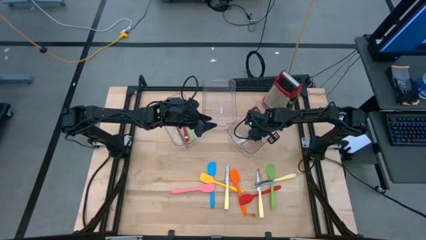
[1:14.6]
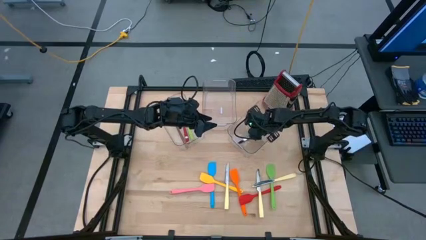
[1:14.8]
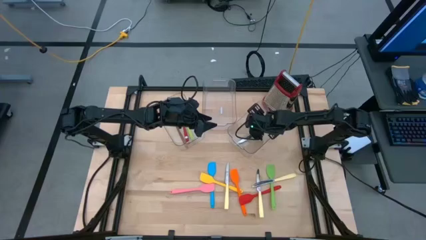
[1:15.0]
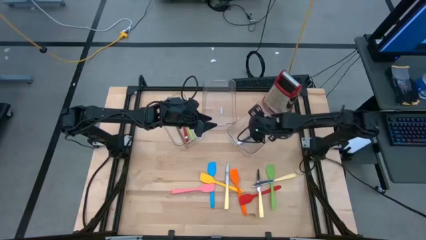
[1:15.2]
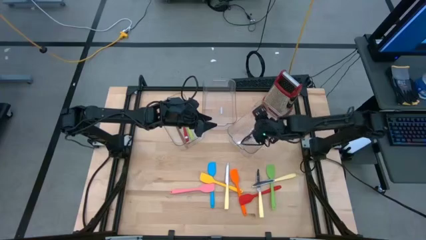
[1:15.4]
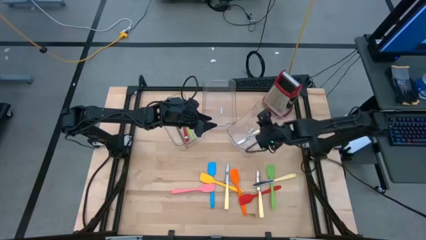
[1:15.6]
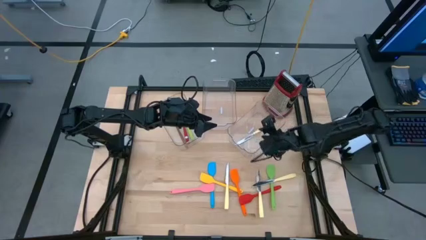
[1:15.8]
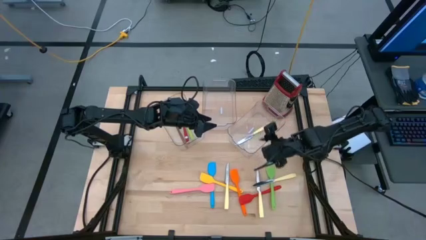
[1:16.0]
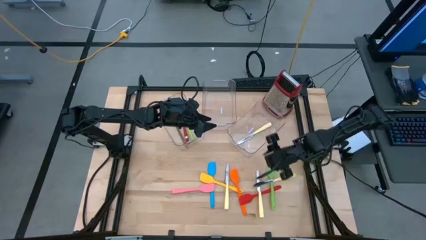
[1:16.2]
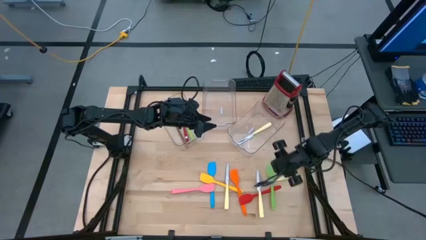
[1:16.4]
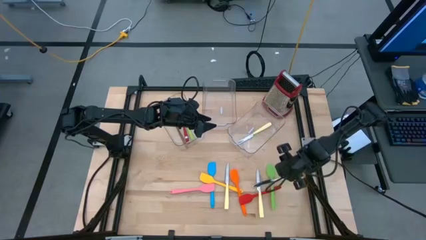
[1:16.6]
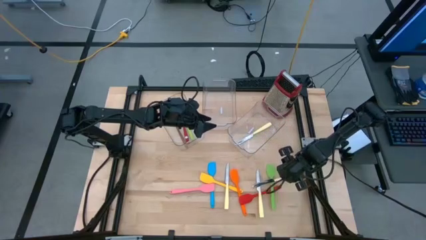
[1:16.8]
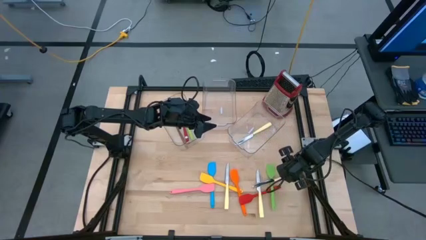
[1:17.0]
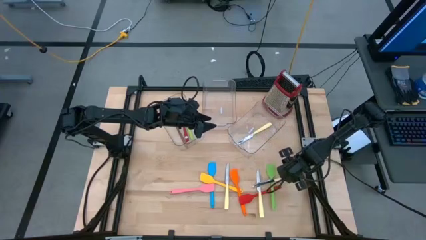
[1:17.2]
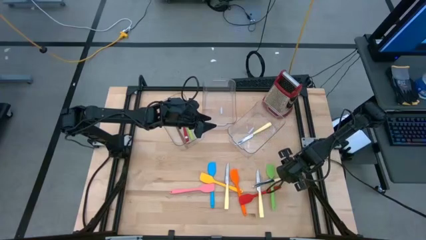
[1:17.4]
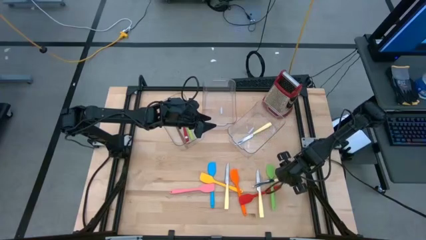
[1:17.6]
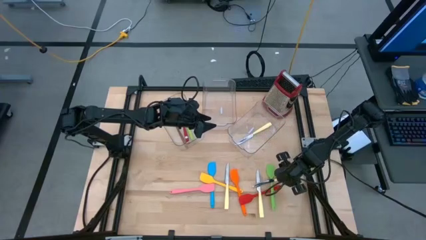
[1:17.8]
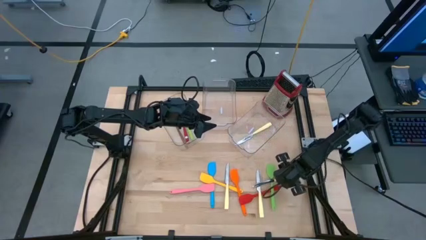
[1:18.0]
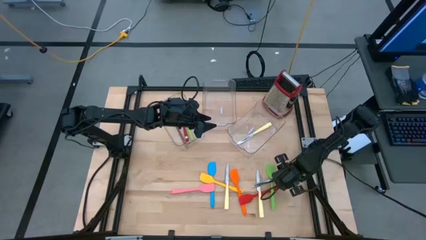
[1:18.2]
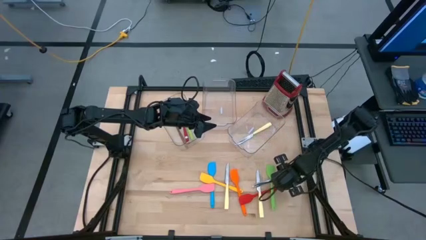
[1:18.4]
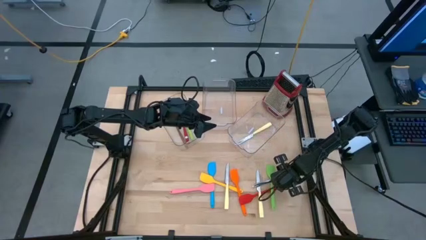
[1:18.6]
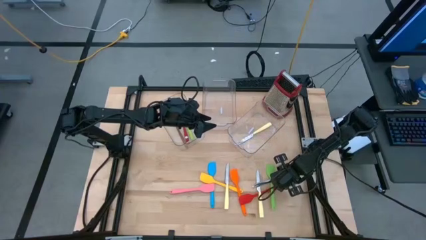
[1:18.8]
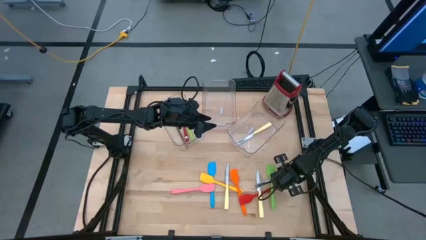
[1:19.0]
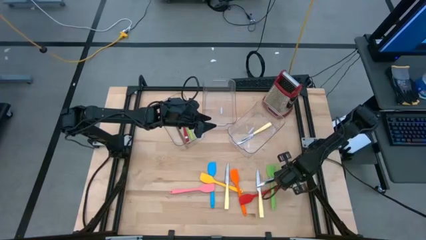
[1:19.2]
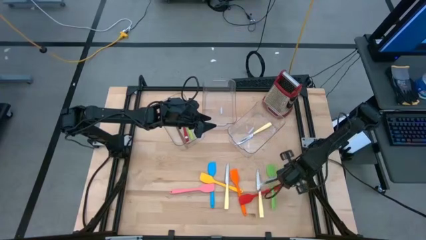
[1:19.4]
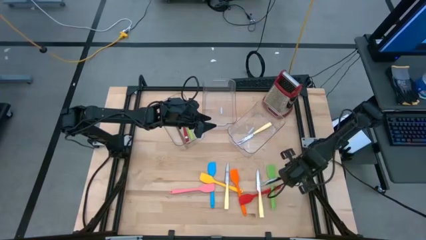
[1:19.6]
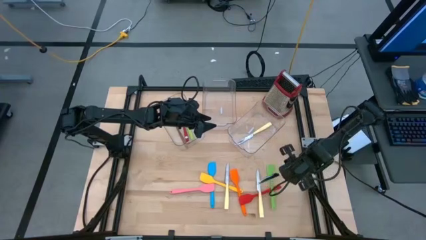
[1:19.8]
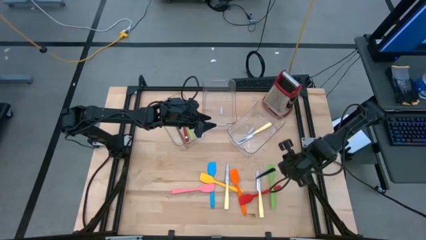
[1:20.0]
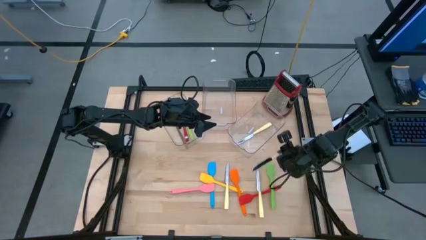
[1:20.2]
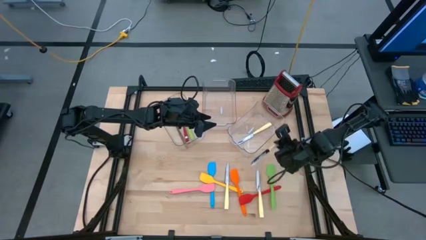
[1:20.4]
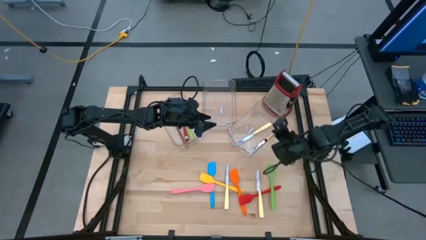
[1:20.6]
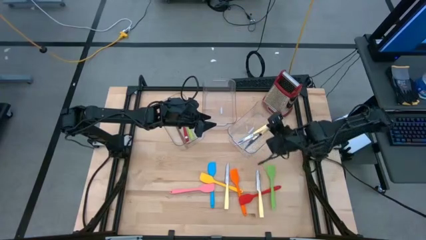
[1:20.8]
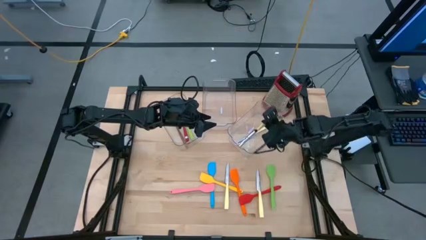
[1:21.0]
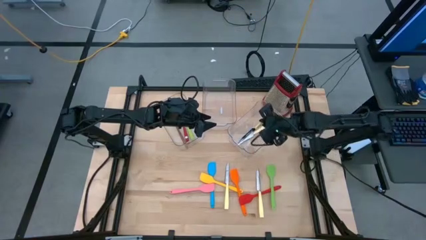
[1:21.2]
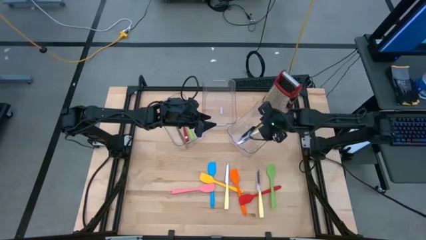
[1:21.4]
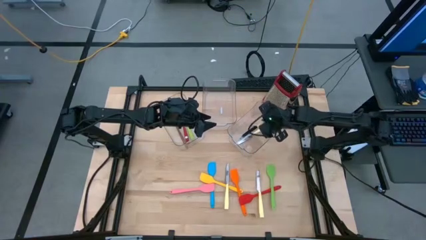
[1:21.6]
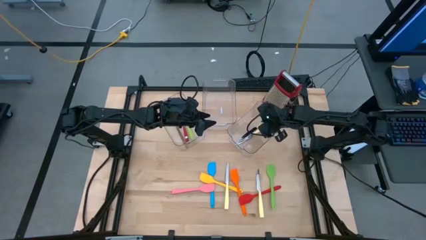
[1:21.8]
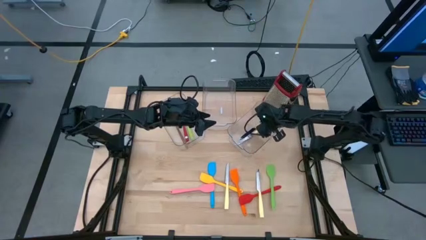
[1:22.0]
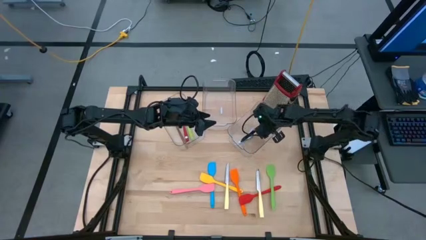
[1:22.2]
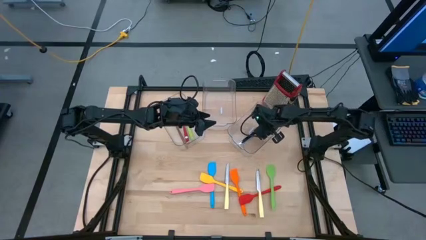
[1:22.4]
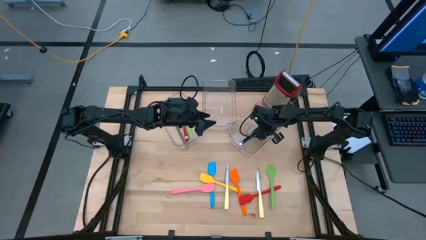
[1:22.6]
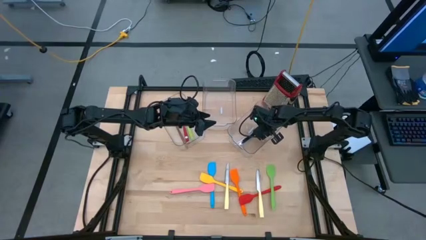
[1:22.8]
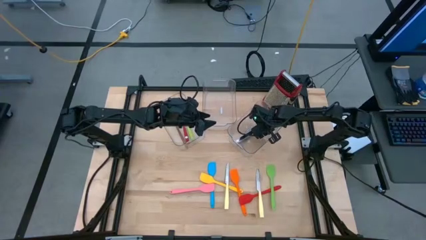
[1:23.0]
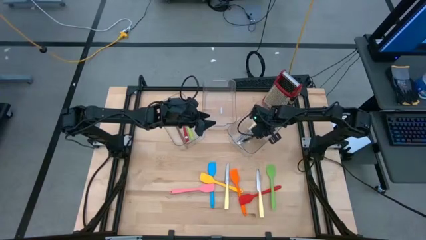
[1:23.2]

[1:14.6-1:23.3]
Task: Pick & Place Kitchen Items
Put the yellow table knife into the right transparent bin

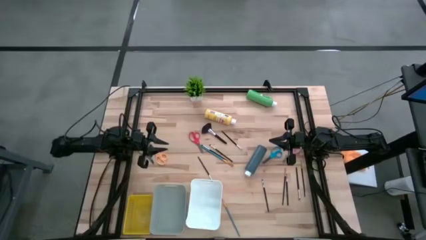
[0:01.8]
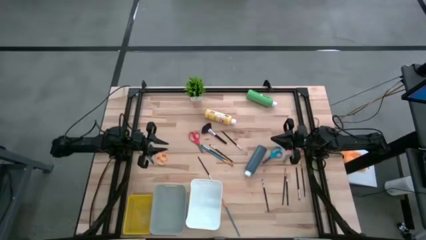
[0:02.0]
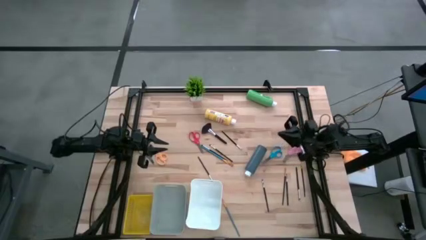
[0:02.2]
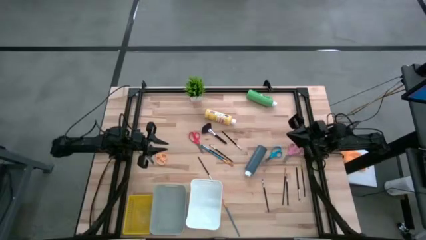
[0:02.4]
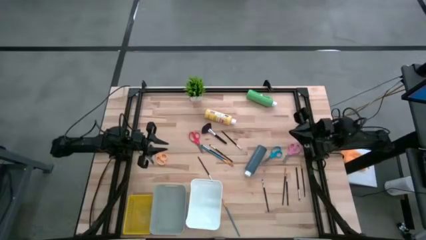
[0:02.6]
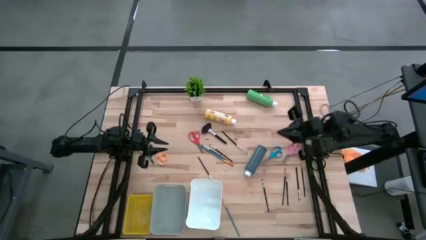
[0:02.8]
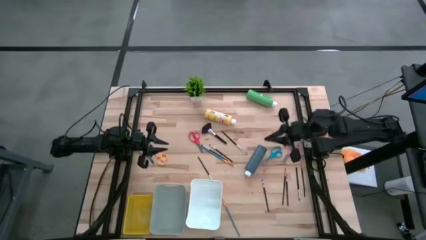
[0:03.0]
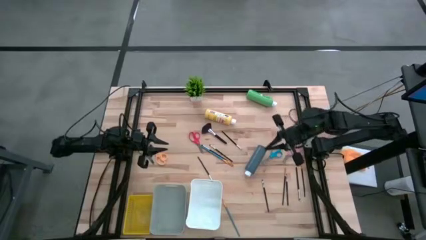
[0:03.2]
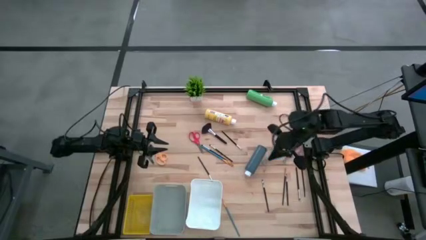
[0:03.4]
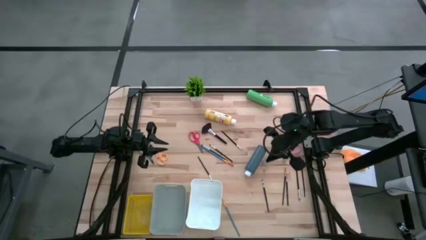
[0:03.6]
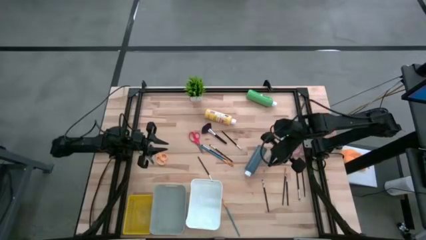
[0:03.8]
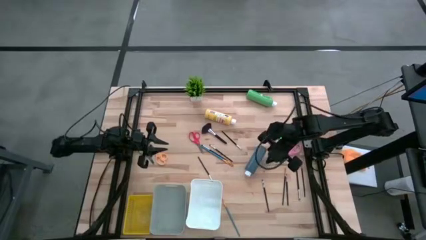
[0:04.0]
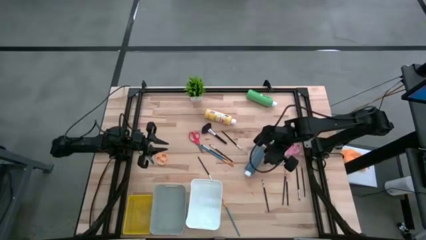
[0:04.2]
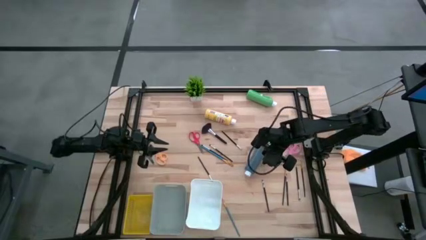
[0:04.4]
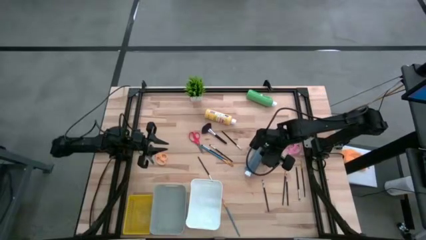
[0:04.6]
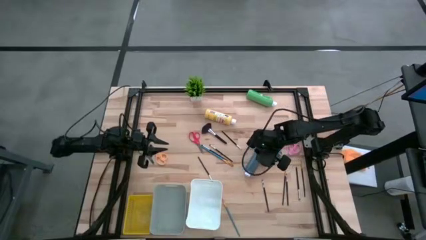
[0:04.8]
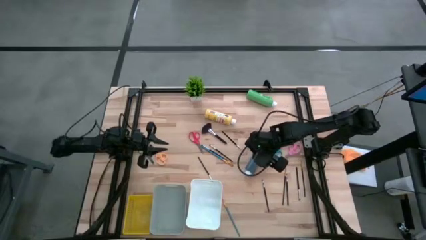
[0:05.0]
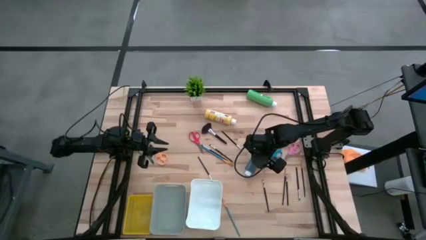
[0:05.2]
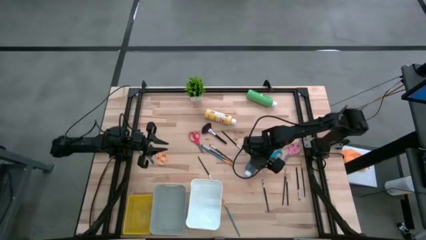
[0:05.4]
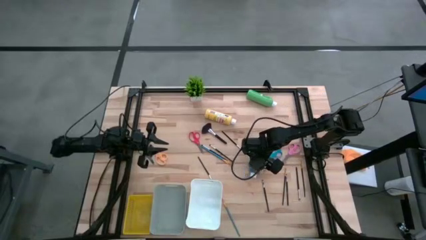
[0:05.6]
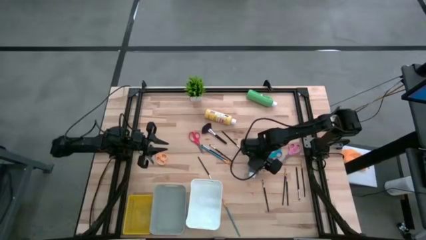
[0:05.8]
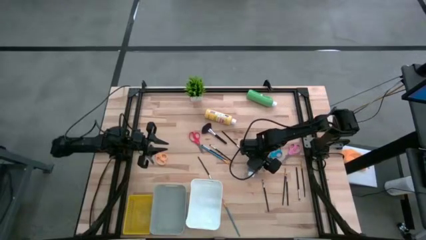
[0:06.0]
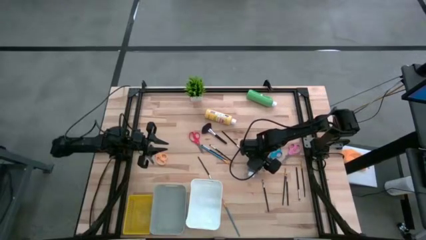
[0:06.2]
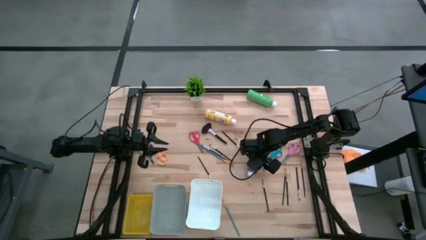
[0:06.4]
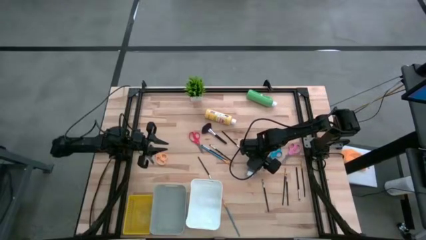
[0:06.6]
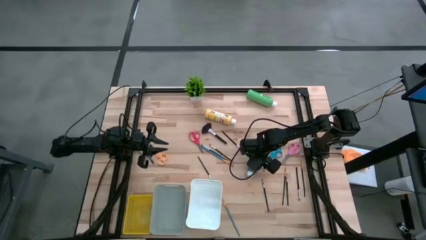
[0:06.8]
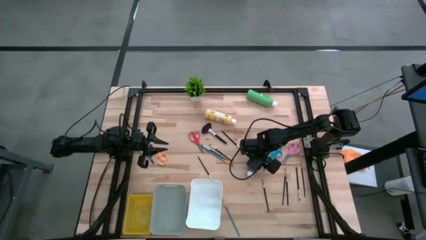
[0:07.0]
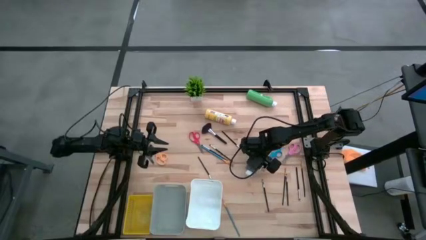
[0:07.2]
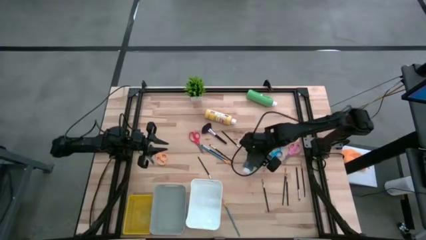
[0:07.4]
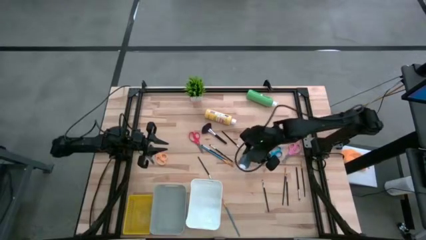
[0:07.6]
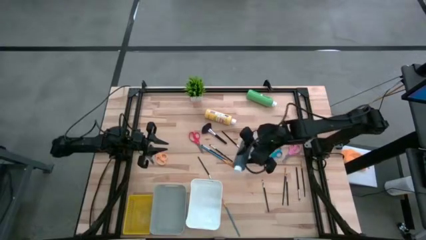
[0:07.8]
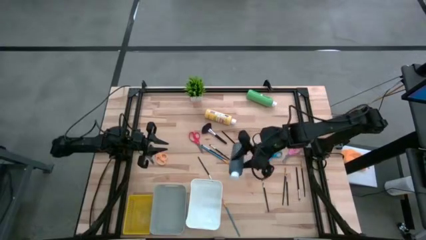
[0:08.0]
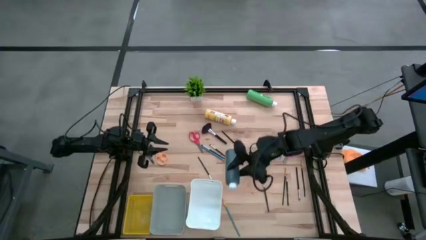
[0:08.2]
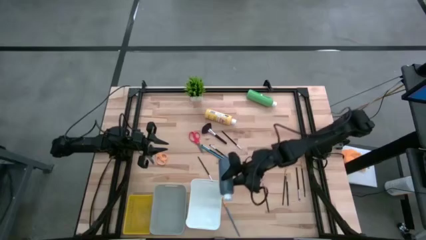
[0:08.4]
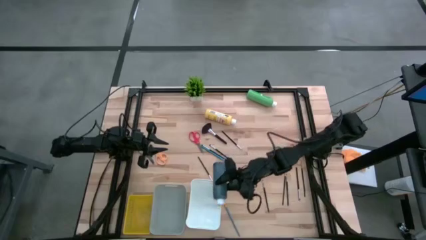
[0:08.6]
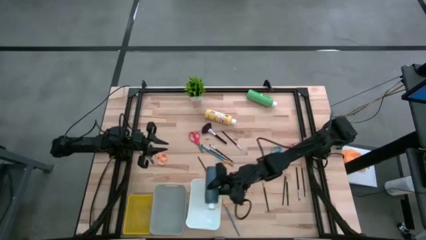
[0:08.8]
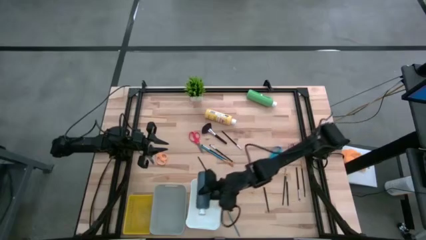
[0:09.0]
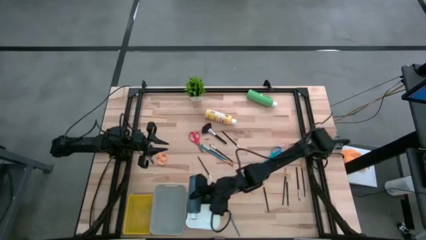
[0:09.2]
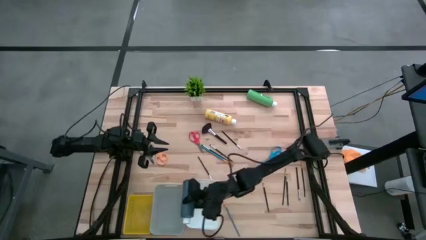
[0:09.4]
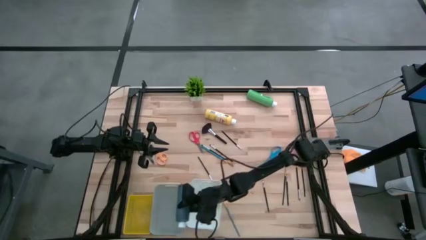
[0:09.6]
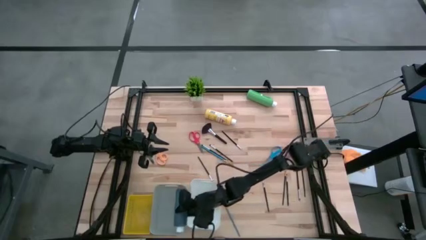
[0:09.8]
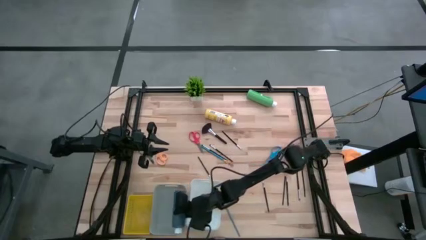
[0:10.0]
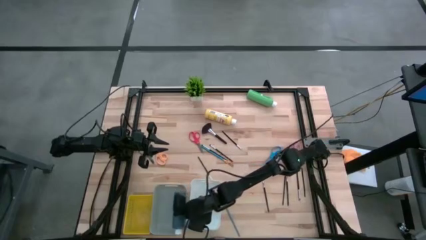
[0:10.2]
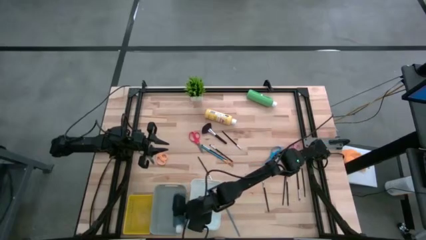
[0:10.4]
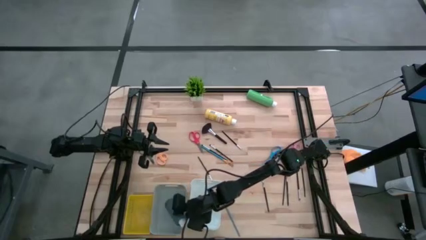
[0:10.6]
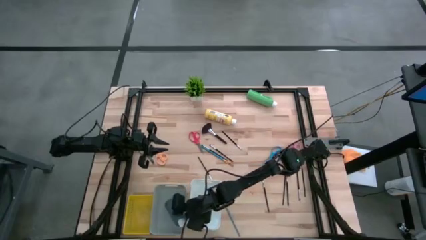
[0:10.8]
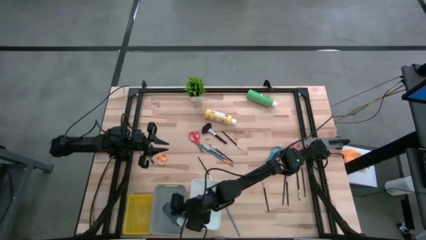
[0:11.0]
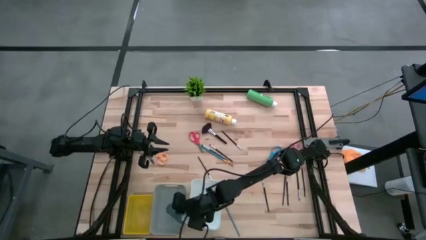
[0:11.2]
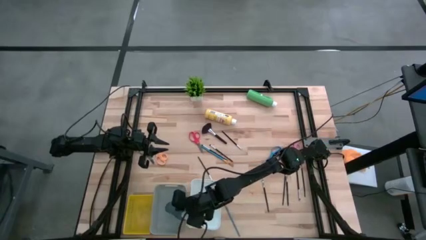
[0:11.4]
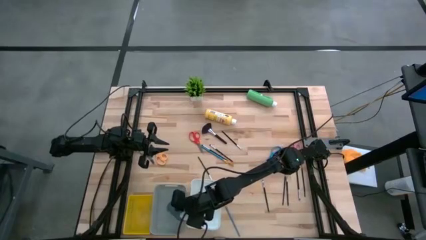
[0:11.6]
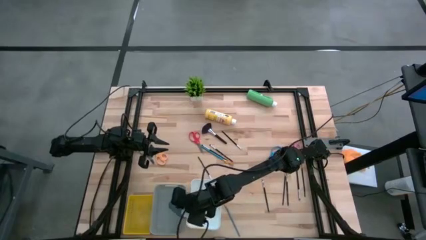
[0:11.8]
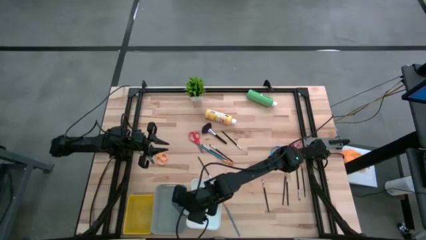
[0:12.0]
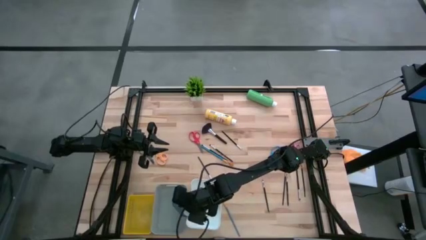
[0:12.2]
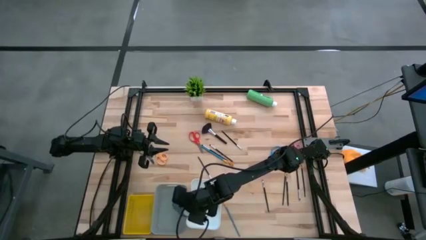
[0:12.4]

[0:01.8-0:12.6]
Task: Pick & Place Paint Supplies
Put the black paint bottle into the gray bin
